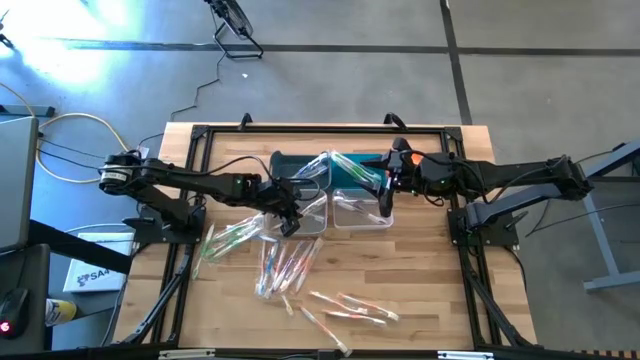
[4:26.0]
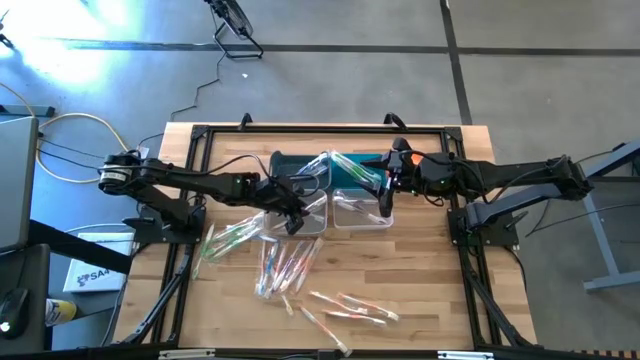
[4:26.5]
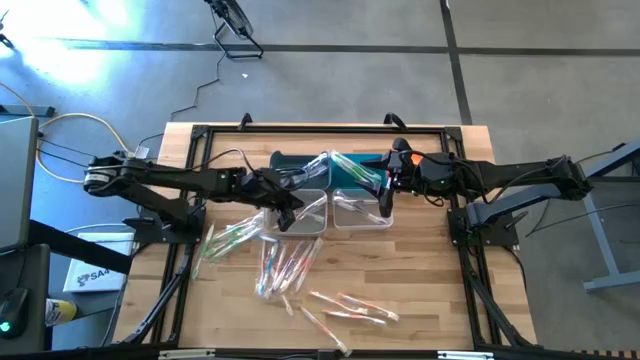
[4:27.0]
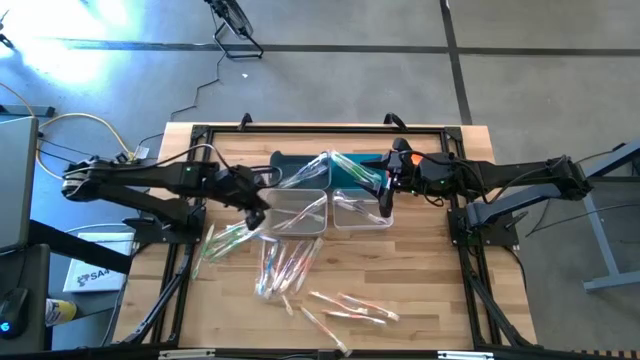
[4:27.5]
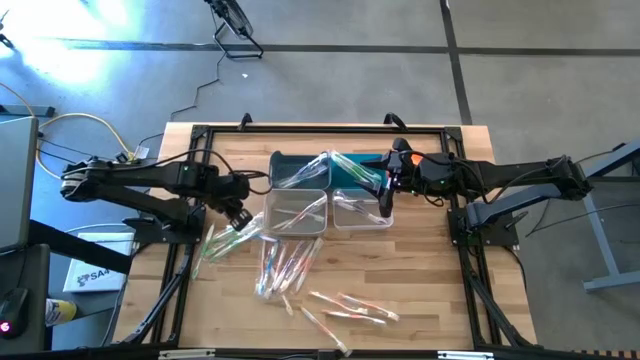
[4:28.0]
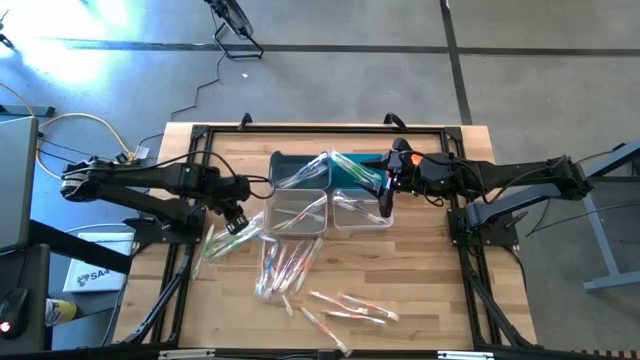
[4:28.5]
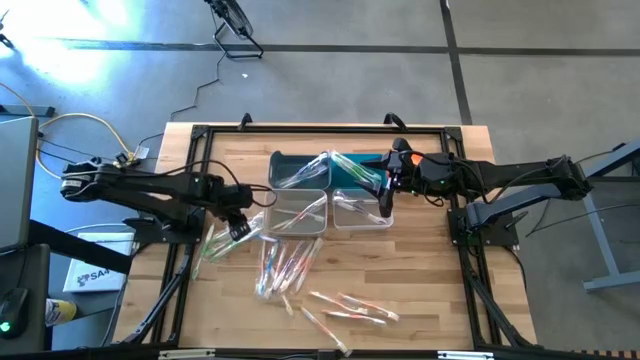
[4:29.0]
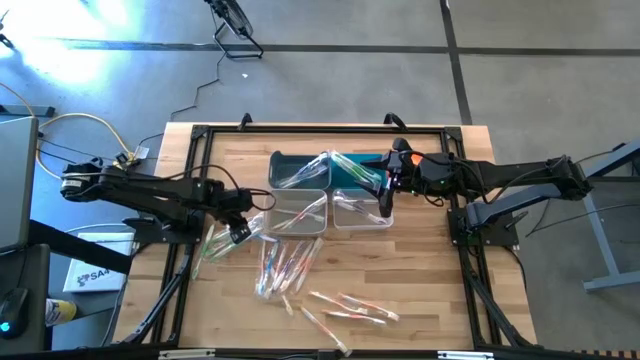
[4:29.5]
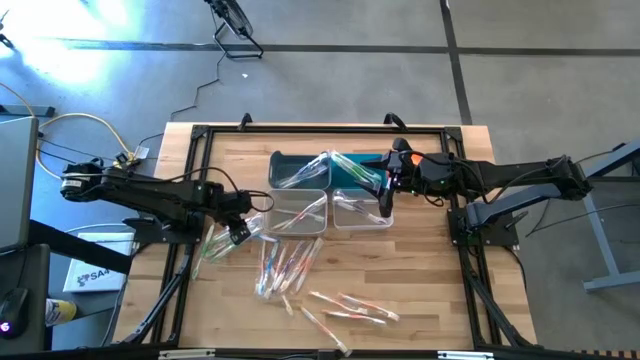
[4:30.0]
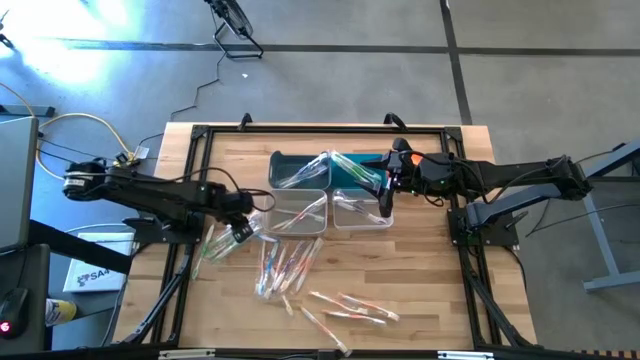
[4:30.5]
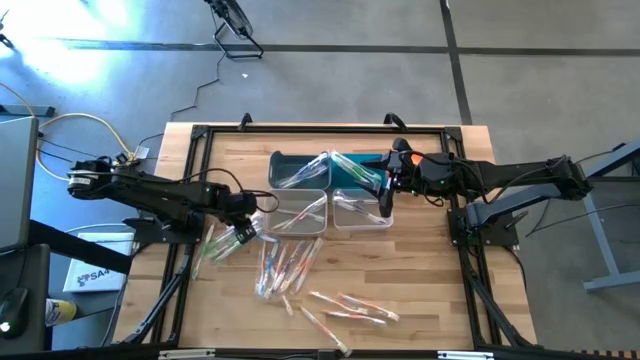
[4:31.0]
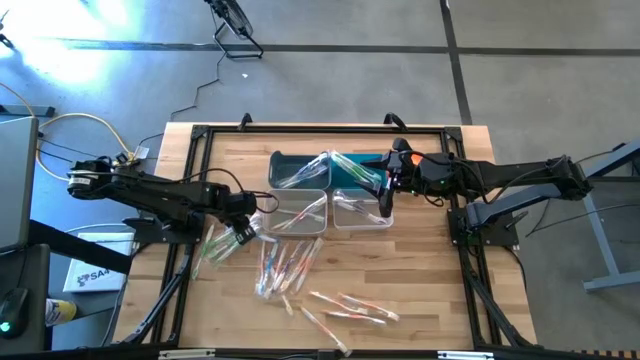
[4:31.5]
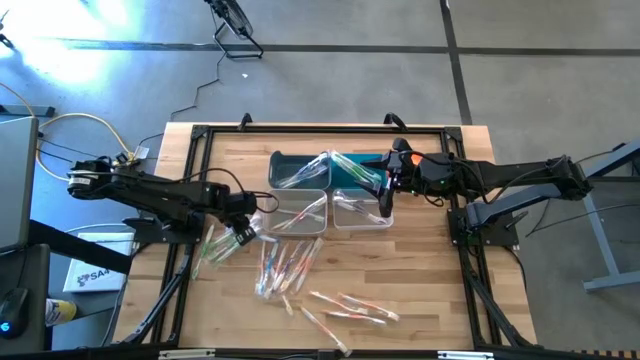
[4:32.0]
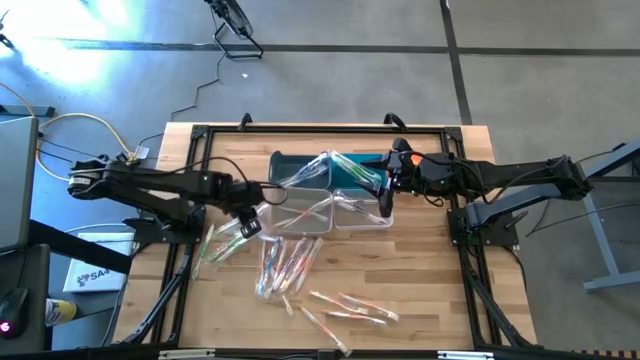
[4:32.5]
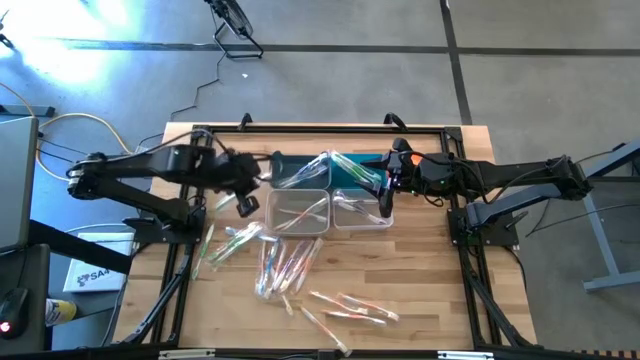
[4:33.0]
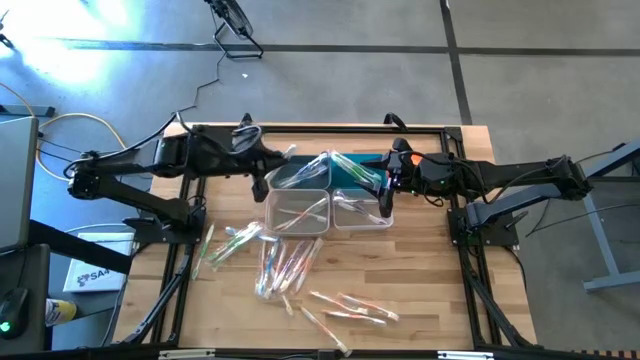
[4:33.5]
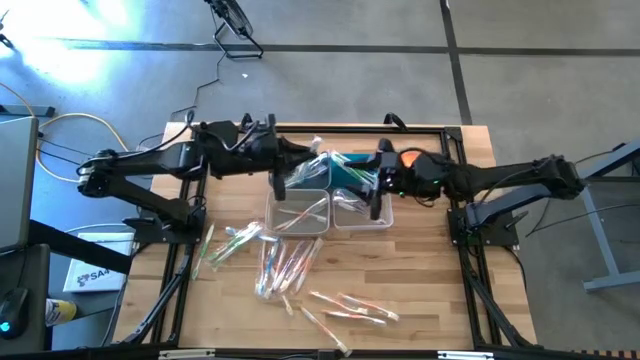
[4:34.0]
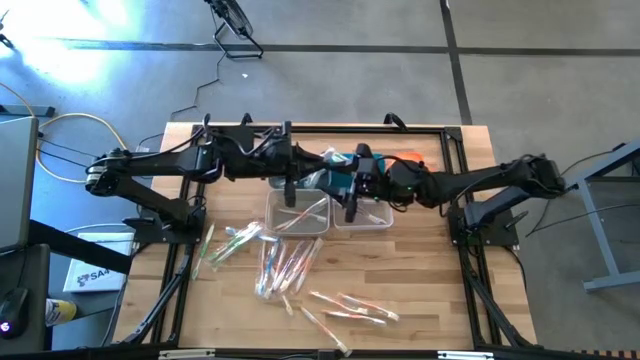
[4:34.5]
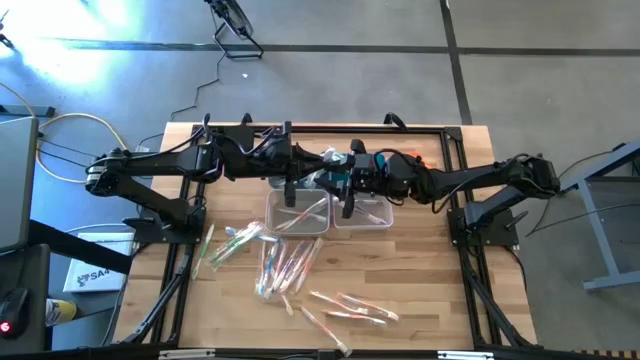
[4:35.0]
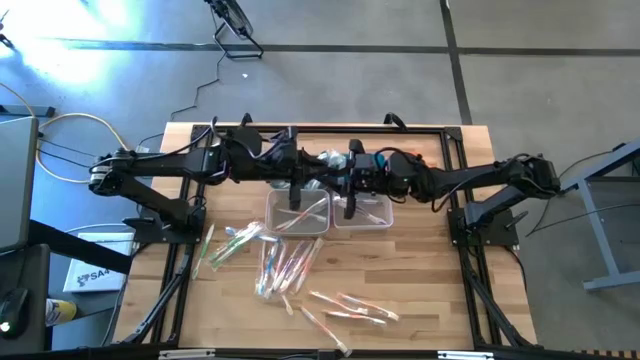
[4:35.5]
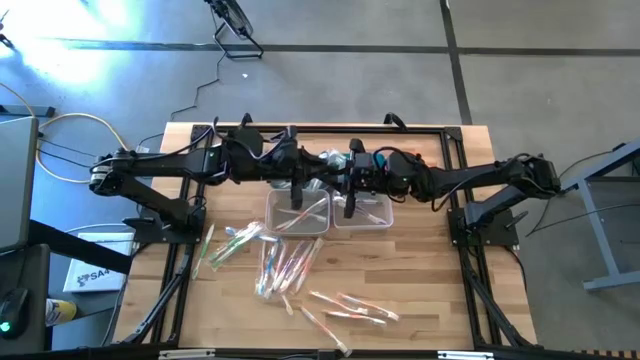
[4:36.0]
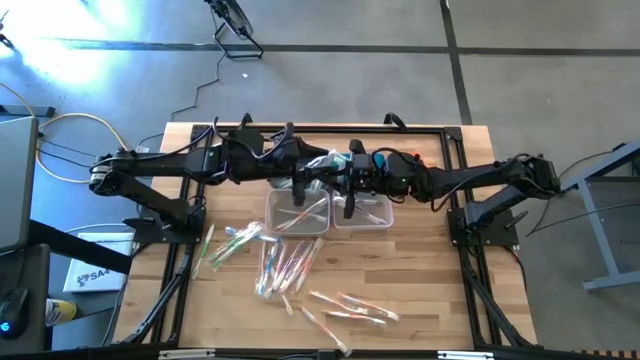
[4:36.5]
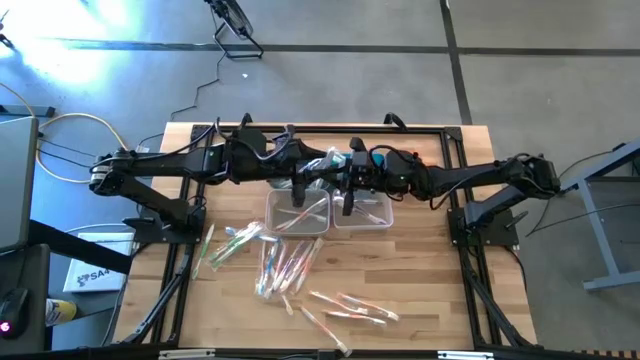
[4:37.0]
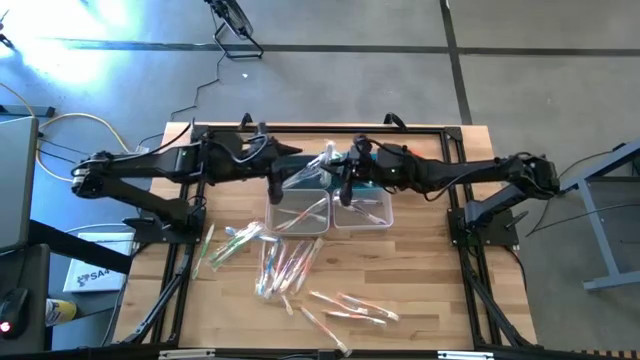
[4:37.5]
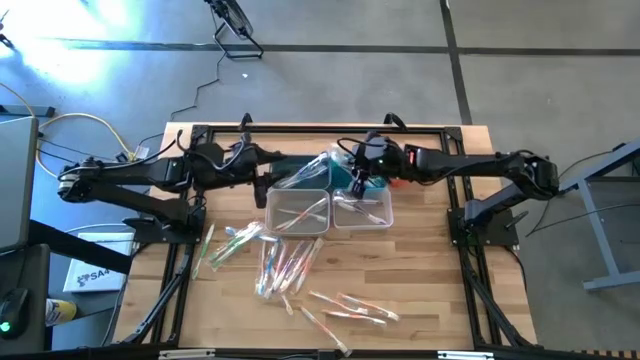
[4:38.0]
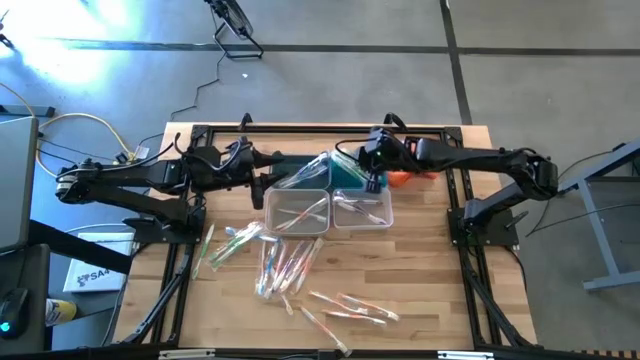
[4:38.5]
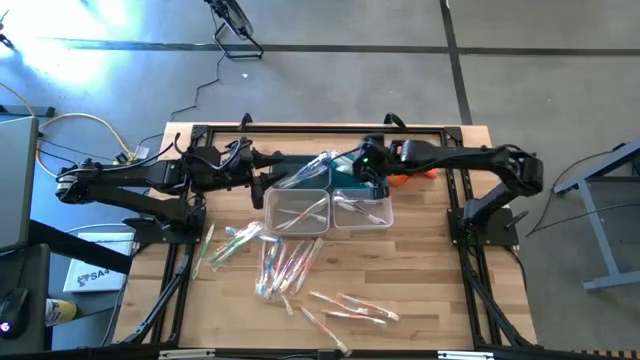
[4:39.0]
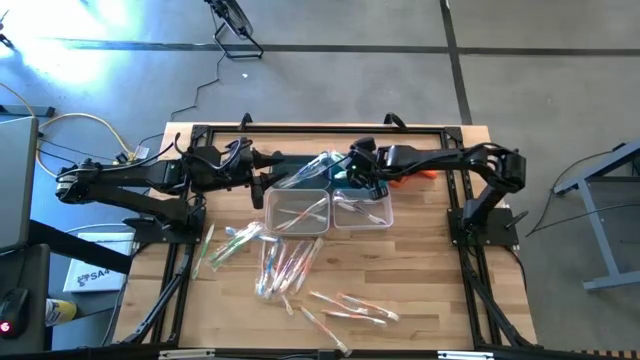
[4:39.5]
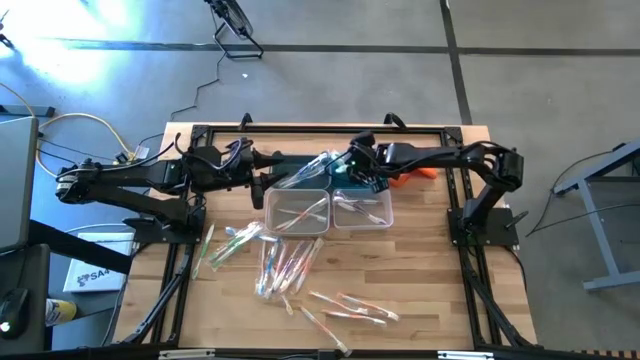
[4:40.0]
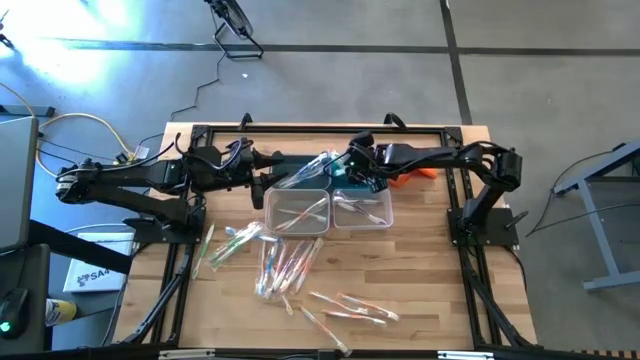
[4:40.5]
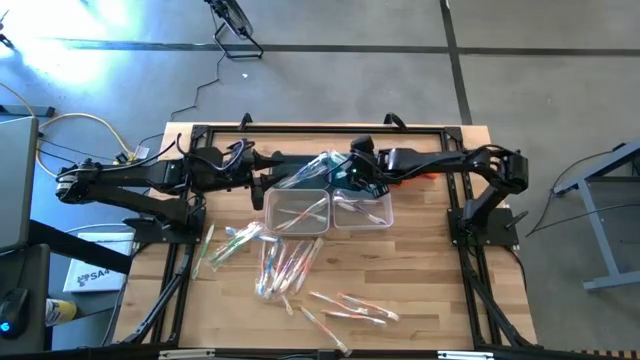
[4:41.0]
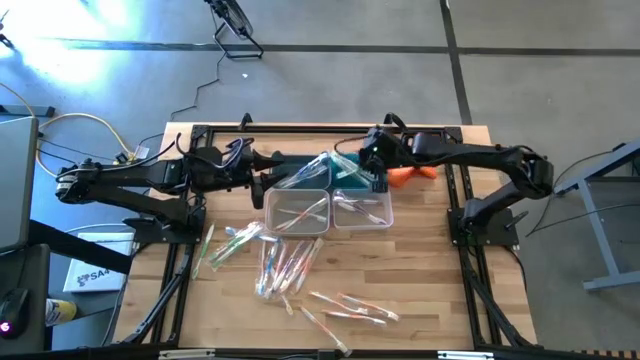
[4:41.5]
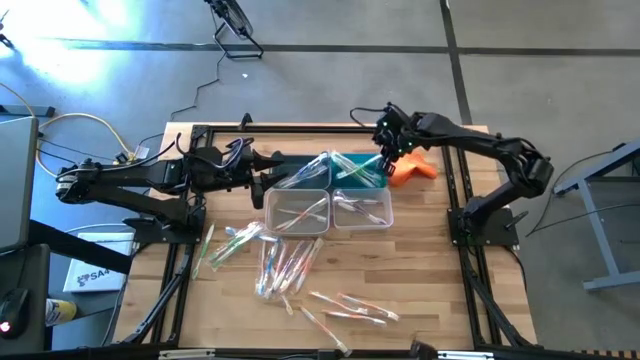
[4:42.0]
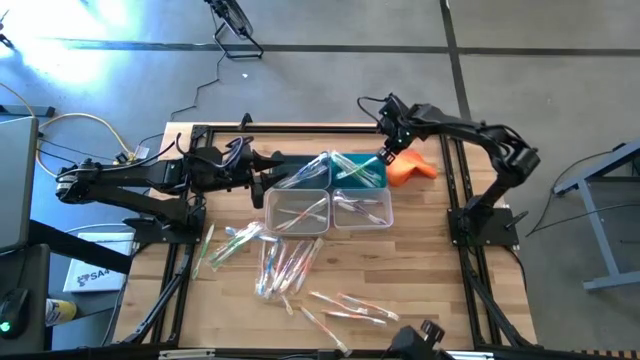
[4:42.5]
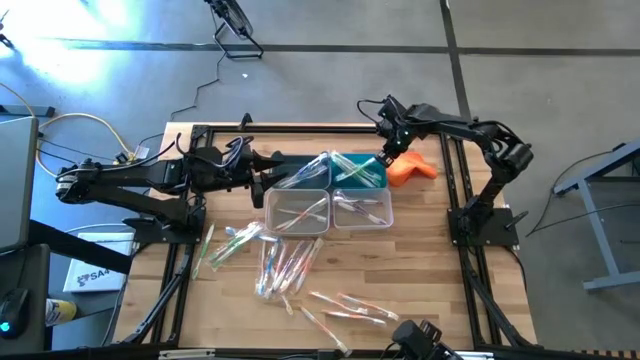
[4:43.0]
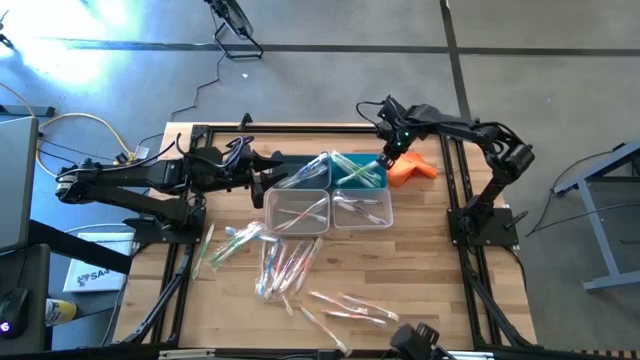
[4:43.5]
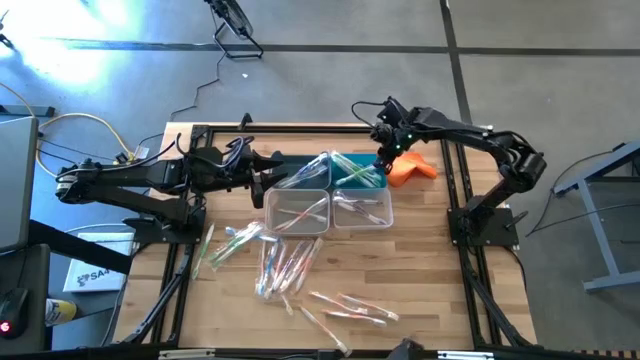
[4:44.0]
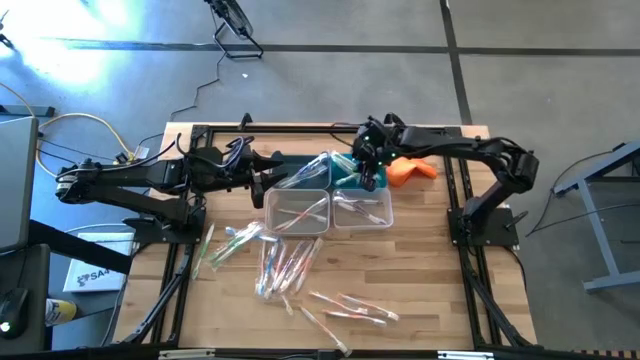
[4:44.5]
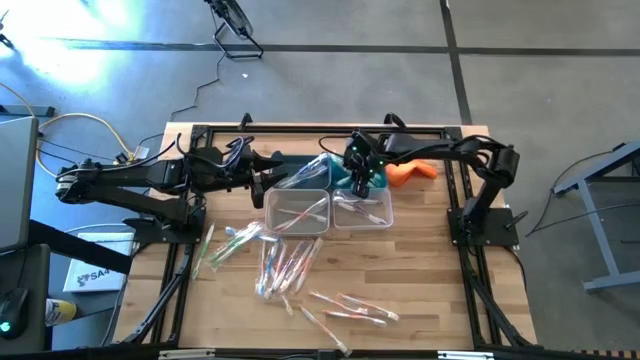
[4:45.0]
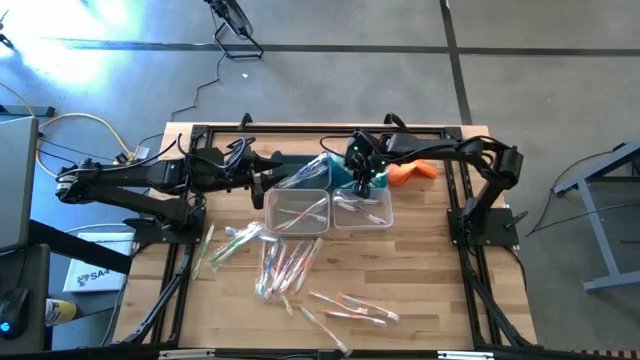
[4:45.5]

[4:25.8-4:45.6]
Task: Pick & Place Toothbrushes
Put the green toothbrush into the blue bin
